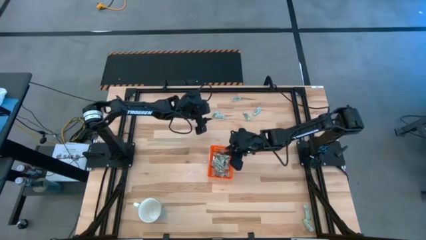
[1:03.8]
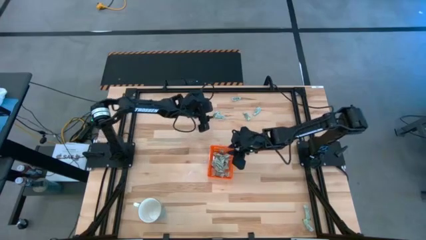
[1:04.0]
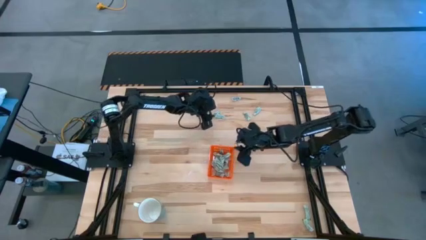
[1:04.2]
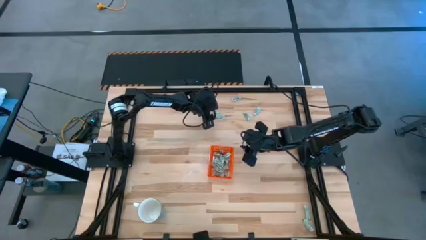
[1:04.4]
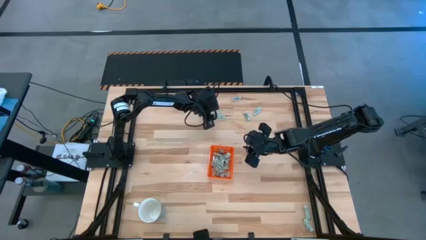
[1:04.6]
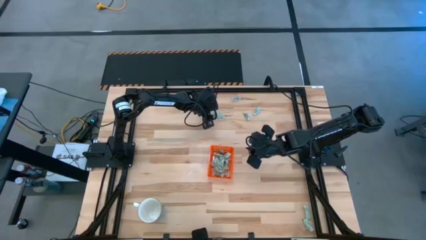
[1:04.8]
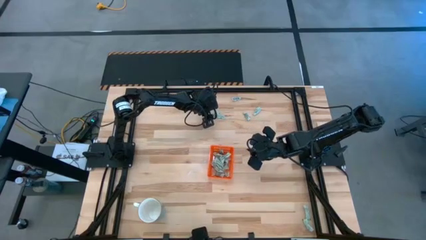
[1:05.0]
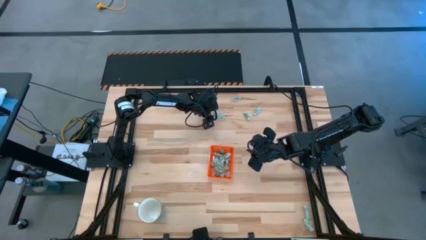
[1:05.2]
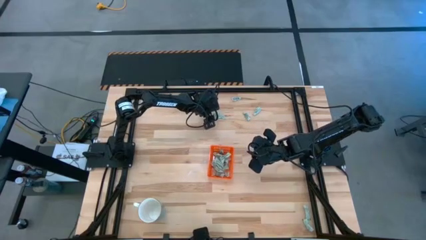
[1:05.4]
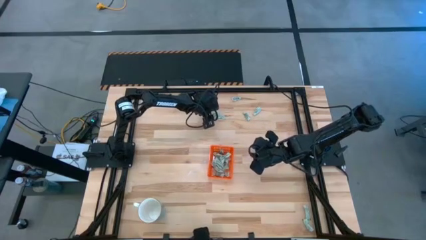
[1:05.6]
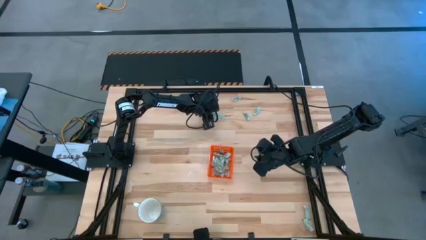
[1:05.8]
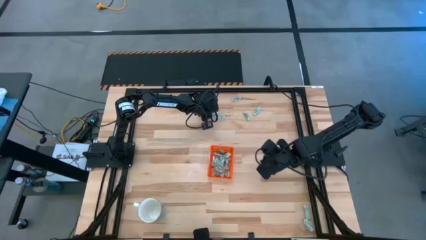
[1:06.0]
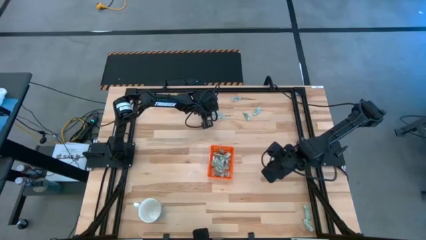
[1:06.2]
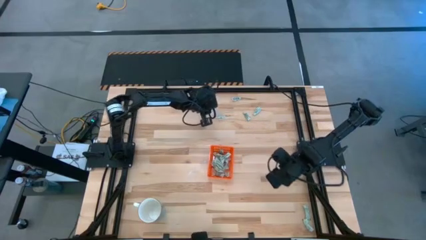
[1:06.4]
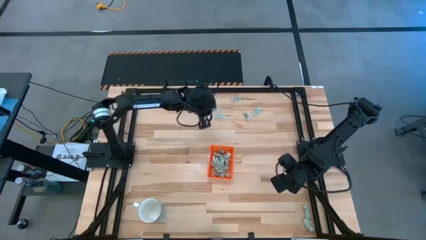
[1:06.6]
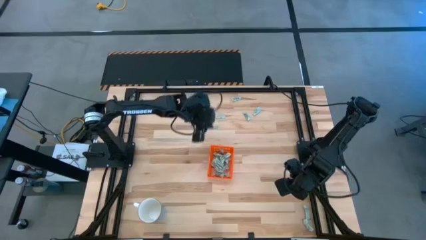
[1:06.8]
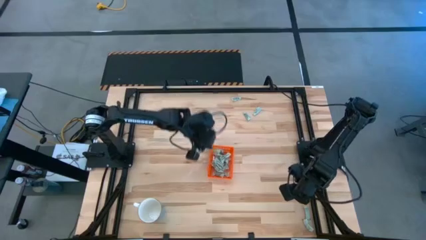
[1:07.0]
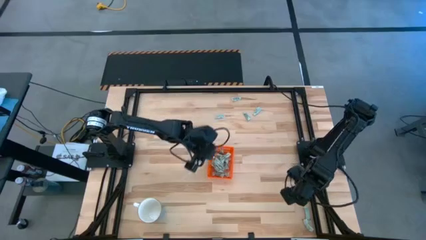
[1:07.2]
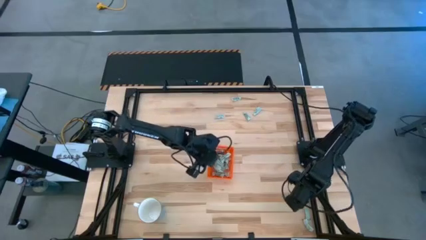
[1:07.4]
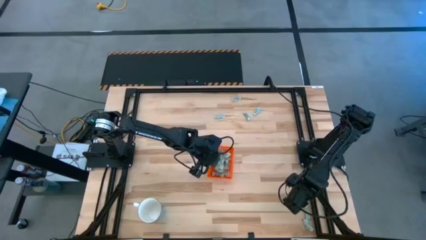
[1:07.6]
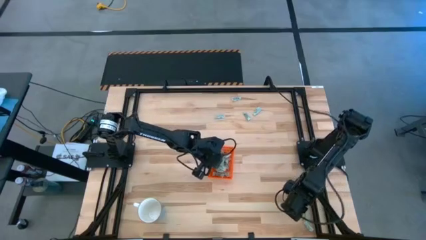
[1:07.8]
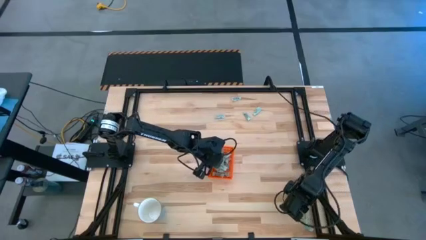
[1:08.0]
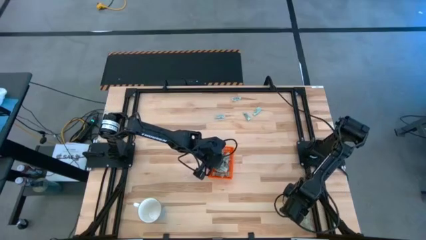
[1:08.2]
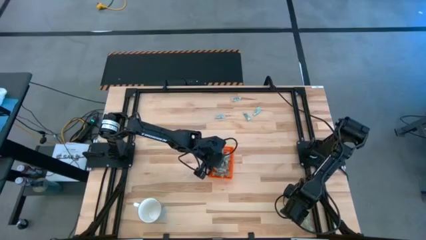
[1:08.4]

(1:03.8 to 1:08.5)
Task: Pick and place Stevia / Truvia into bins
Put the stevia packet into the orange bin

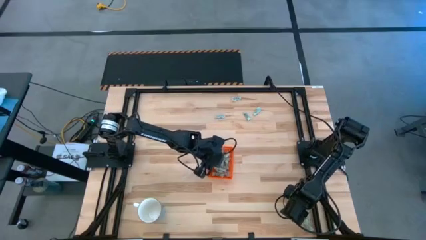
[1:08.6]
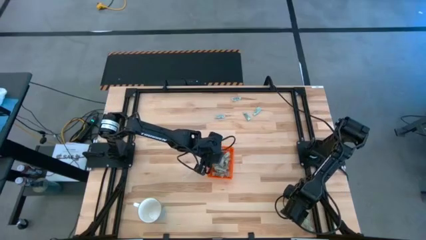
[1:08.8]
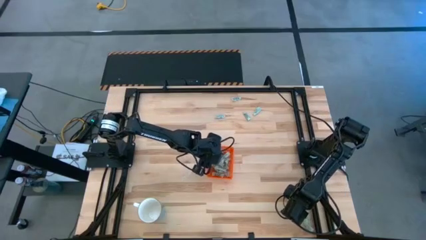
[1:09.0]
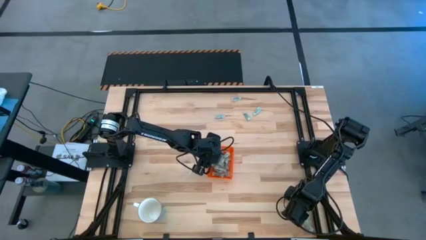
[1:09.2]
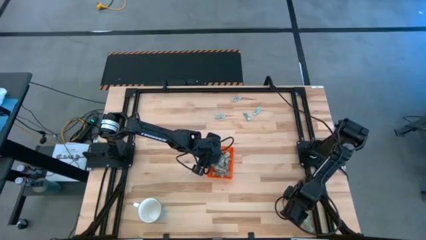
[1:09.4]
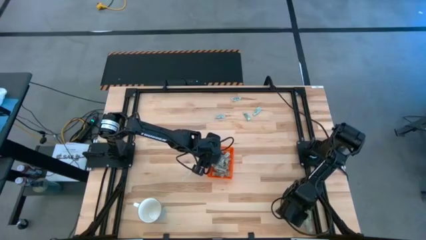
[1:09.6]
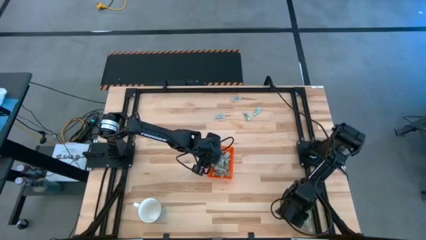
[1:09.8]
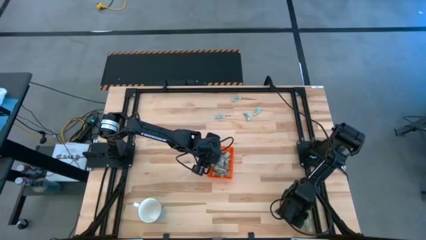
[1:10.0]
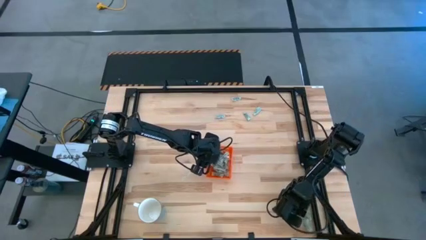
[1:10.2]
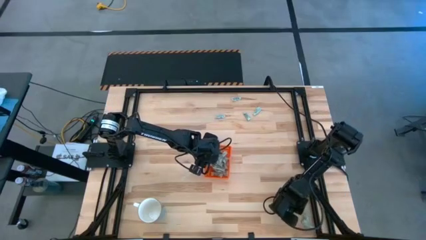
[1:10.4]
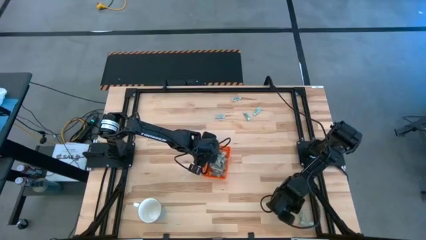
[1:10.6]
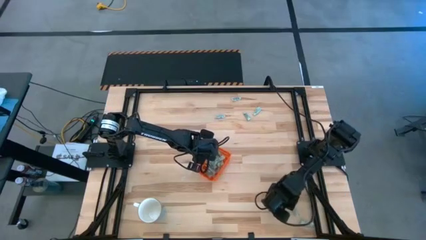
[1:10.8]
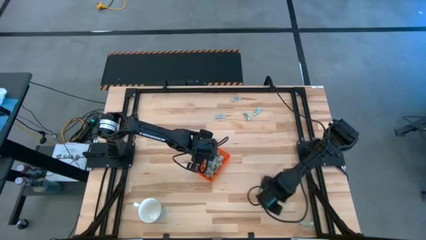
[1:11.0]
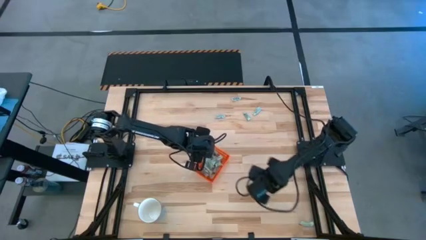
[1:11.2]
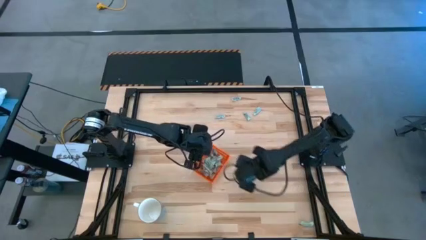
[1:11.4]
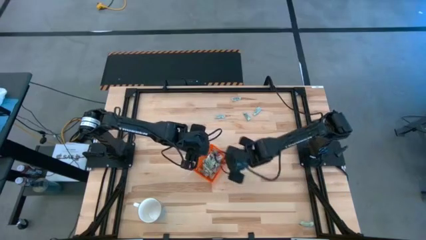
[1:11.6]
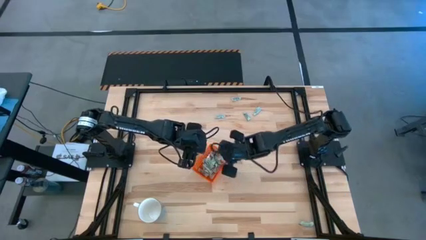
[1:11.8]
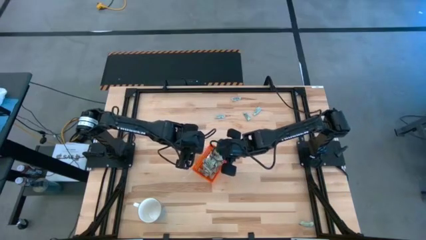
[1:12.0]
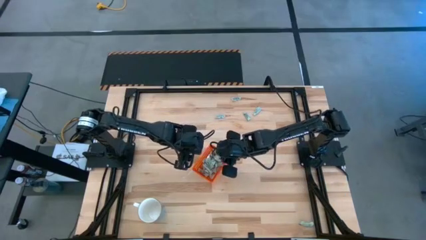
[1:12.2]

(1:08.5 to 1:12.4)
Put the stevia packet into the orange bin

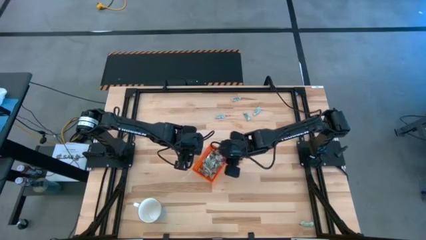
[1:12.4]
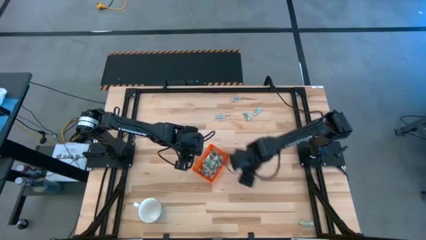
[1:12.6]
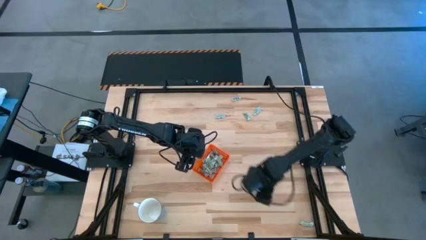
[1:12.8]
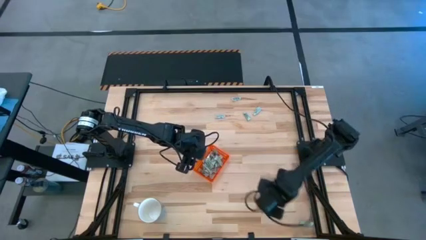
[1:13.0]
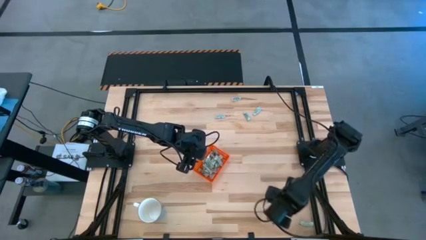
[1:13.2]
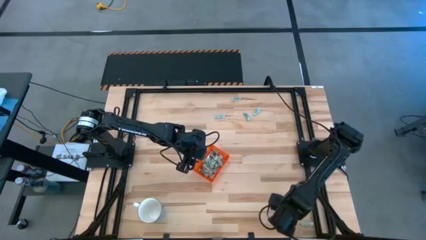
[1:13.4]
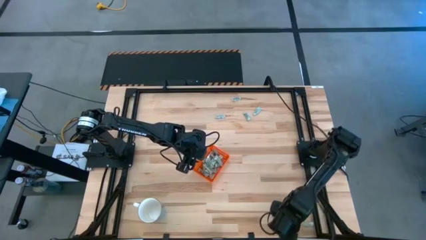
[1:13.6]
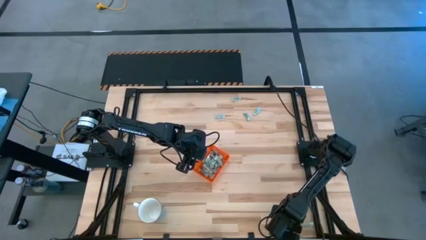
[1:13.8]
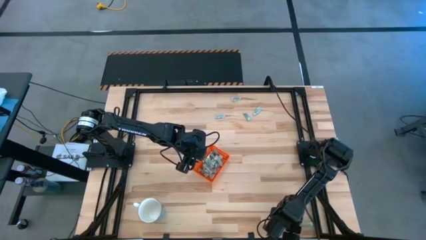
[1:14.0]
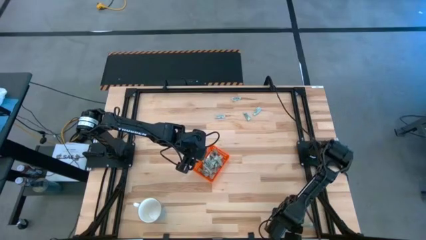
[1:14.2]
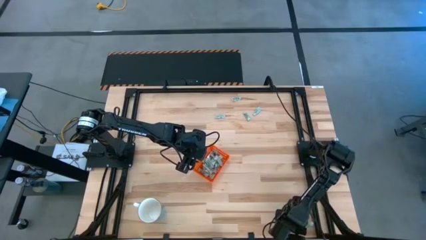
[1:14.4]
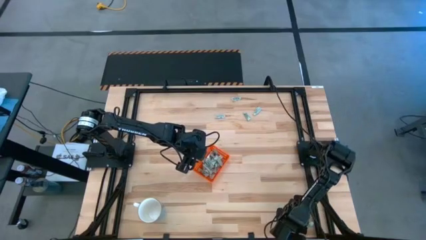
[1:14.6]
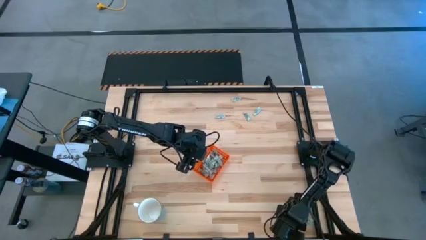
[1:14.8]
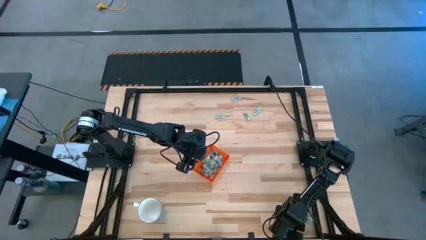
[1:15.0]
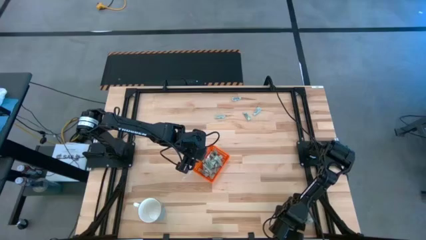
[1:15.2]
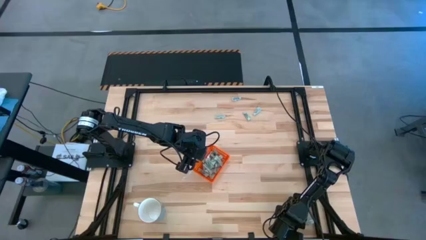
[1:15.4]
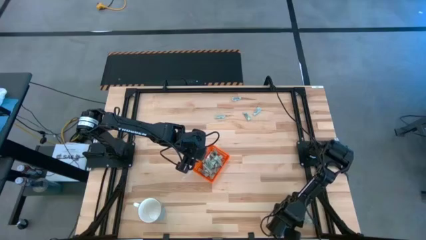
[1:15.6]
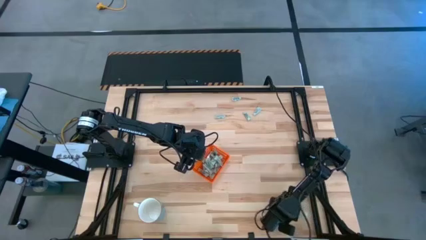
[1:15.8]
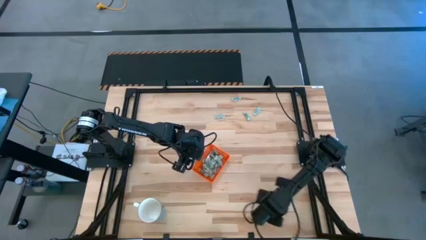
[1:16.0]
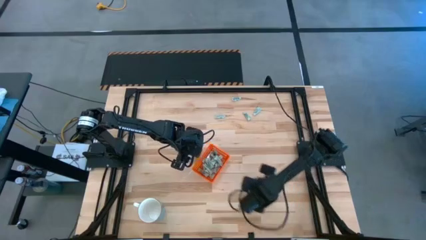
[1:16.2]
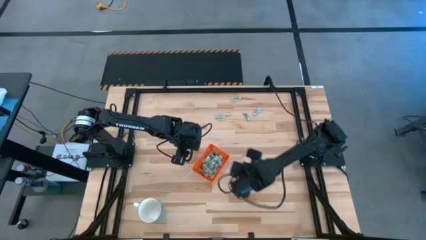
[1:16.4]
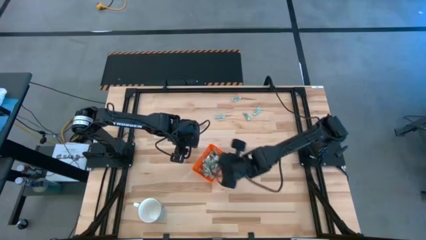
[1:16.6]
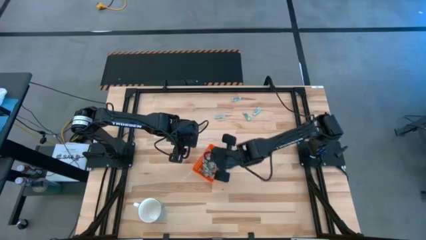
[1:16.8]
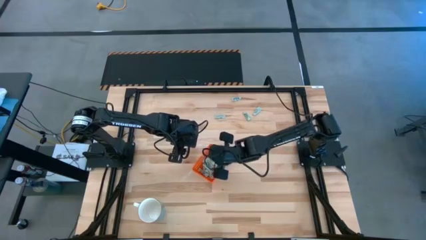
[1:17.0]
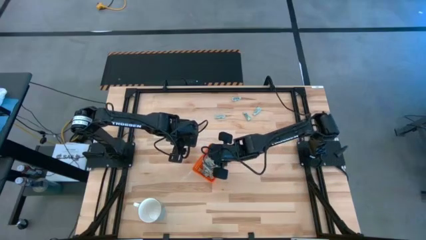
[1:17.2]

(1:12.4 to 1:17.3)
Put the stevia packet into the orange bin

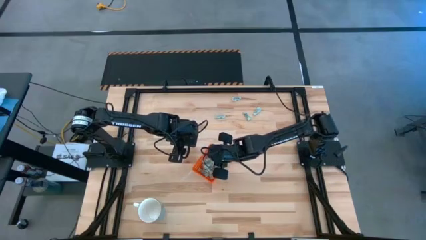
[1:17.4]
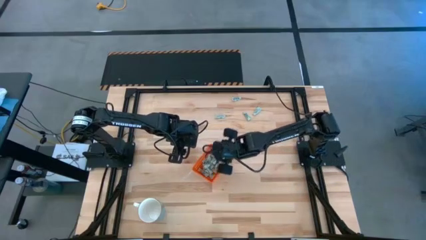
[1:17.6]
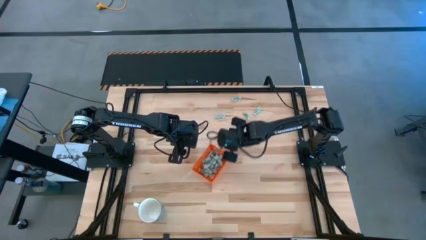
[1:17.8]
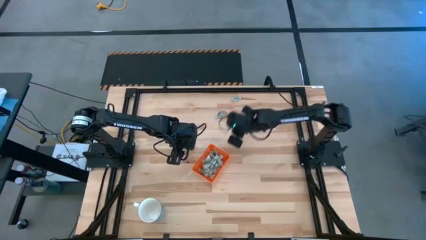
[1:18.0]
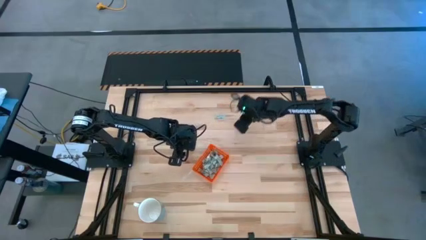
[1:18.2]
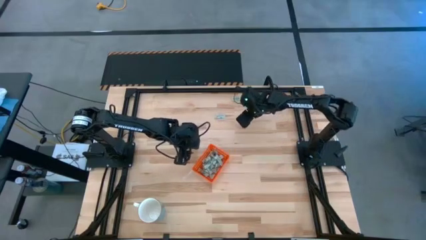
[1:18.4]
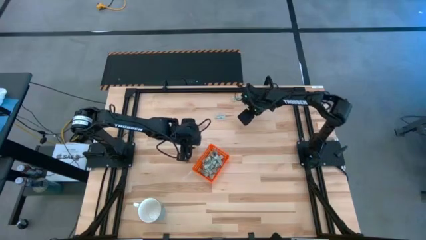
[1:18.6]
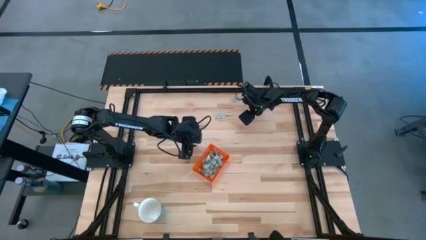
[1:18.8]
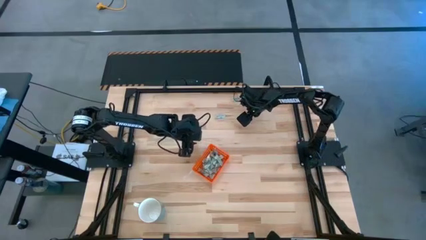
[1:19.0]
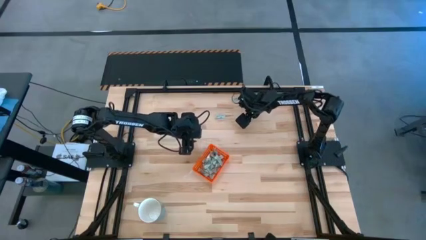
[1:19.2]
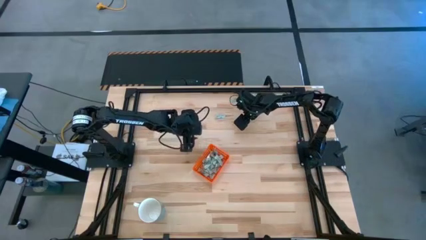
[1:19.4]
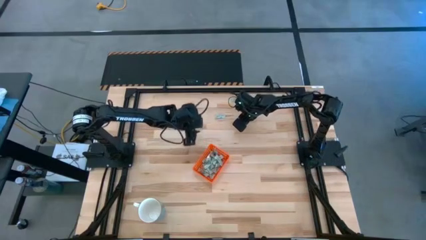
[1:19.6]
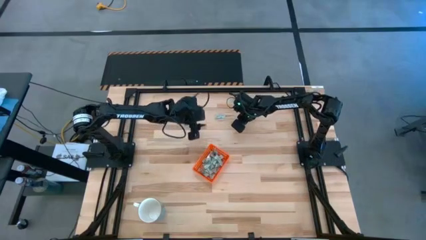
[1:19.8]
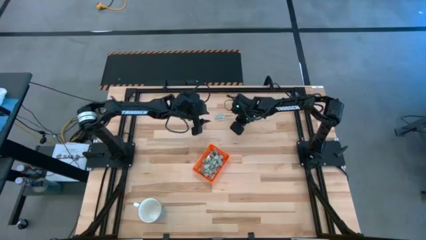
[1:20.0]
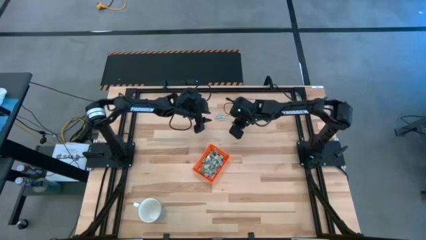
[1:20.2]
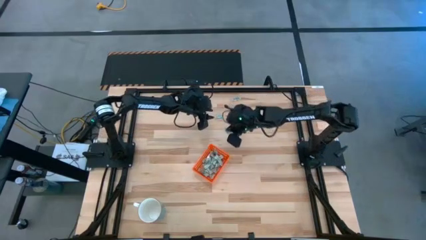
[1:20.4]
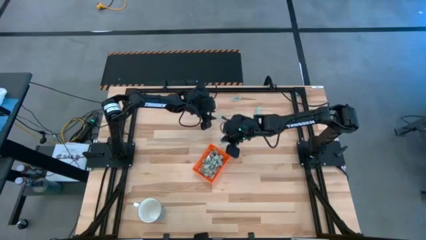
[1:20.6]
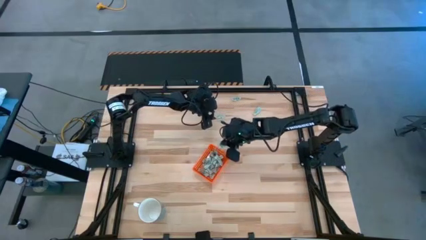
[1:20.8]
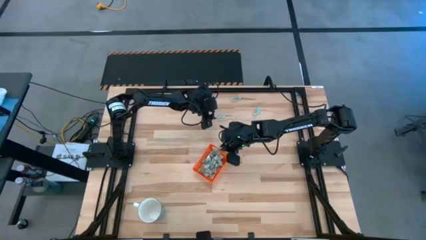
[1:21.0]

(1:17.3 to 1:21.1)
Put the stevia packet into the orange bin
